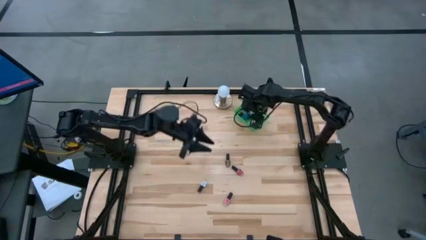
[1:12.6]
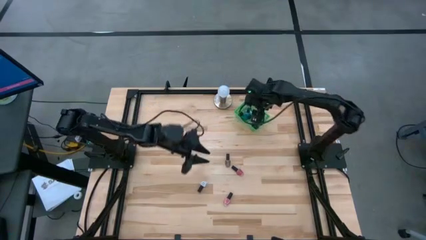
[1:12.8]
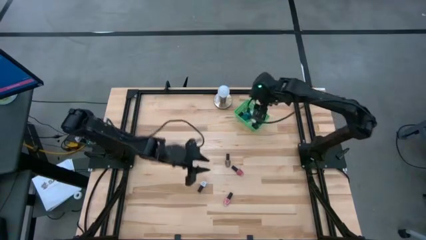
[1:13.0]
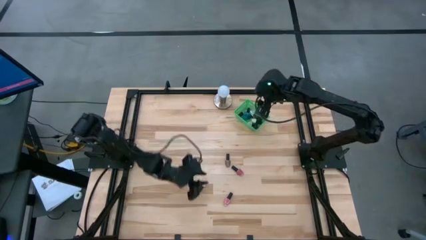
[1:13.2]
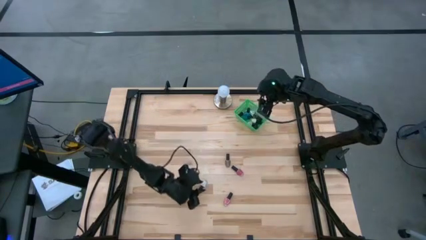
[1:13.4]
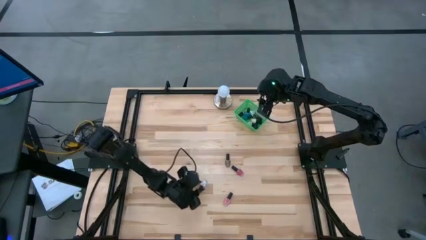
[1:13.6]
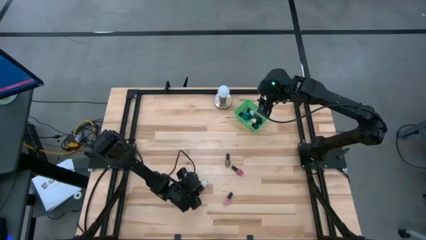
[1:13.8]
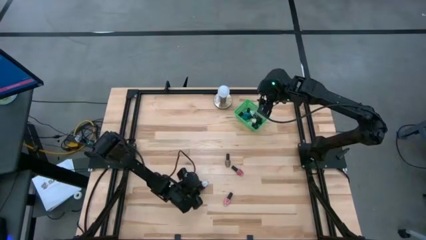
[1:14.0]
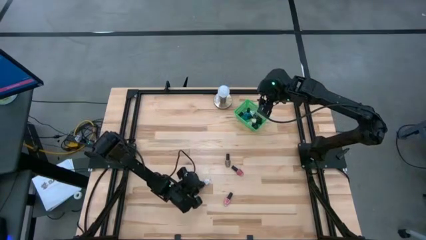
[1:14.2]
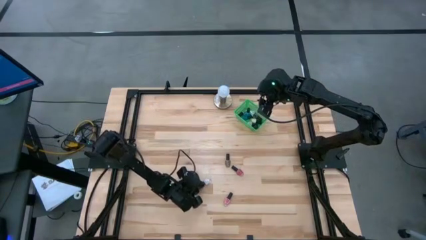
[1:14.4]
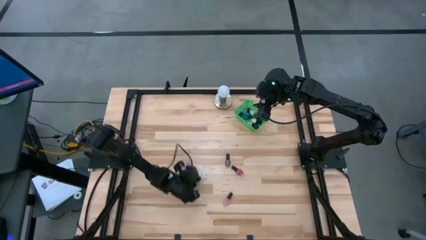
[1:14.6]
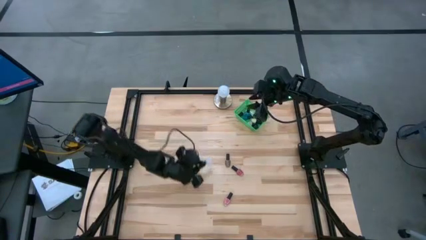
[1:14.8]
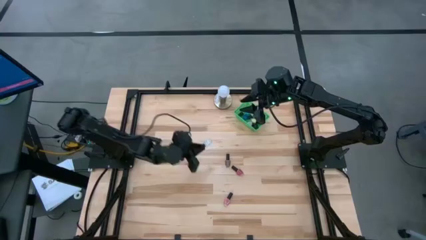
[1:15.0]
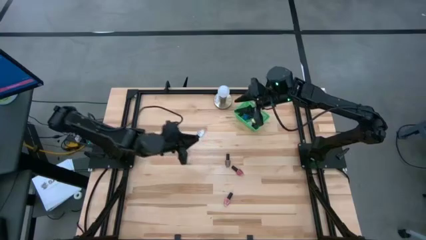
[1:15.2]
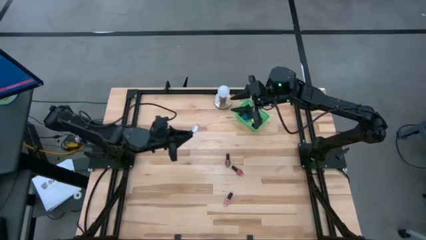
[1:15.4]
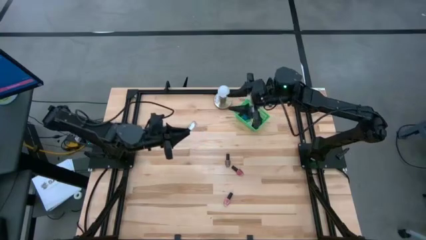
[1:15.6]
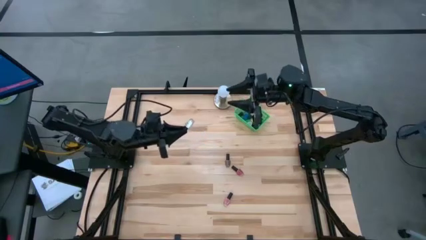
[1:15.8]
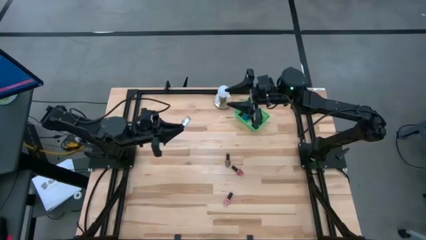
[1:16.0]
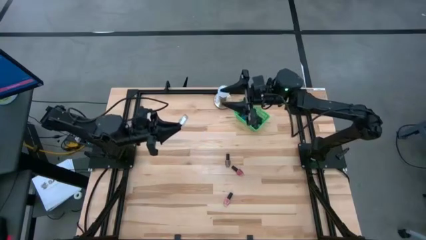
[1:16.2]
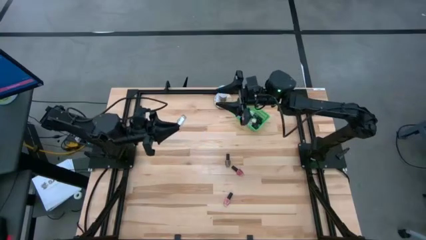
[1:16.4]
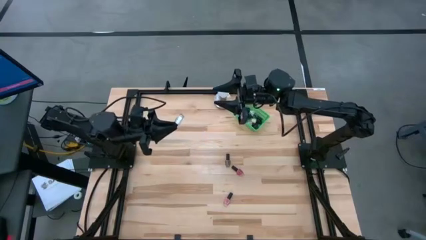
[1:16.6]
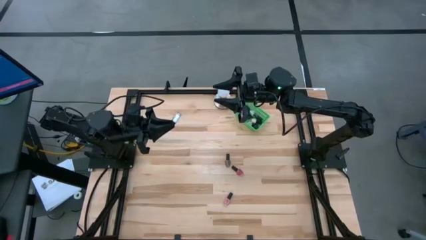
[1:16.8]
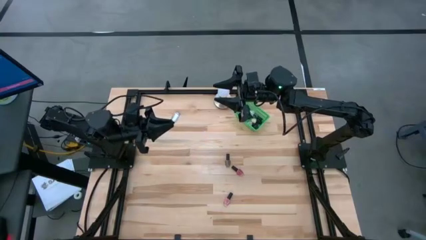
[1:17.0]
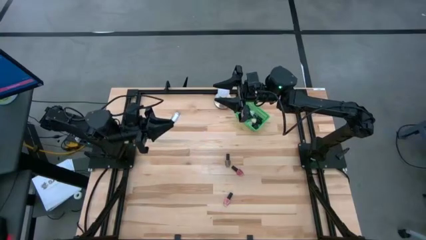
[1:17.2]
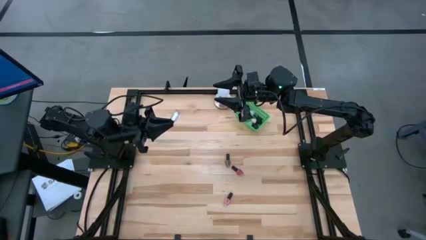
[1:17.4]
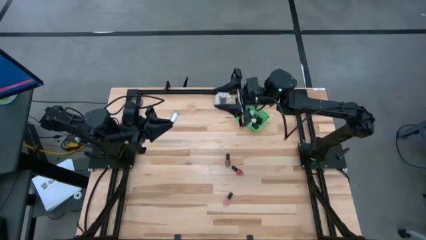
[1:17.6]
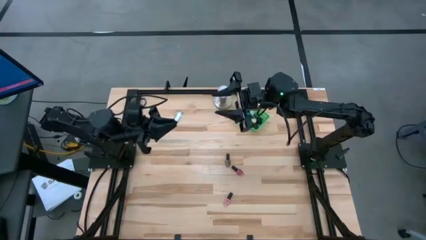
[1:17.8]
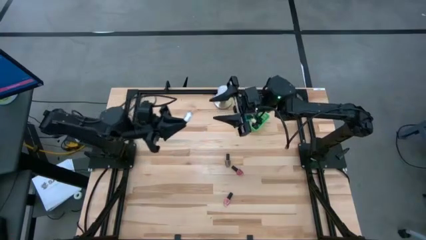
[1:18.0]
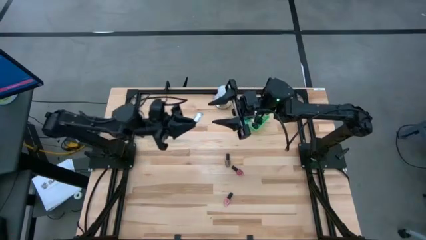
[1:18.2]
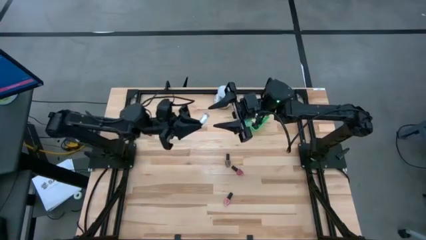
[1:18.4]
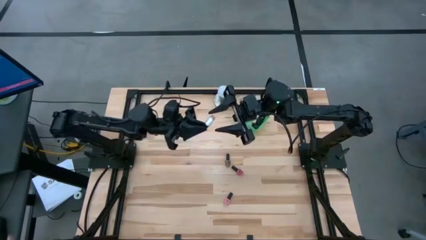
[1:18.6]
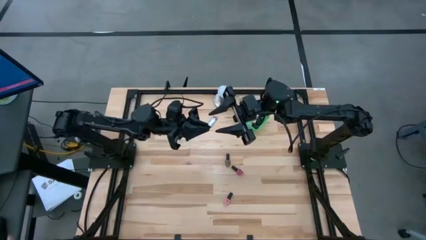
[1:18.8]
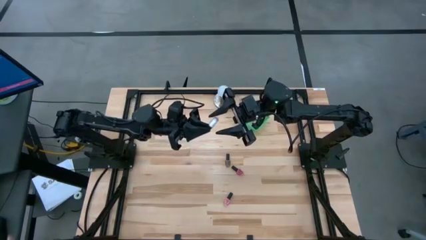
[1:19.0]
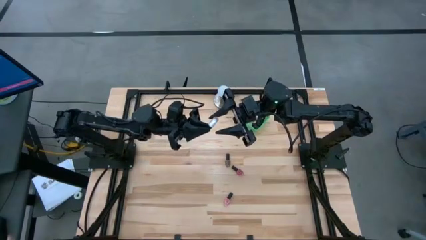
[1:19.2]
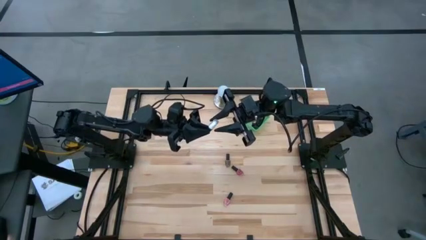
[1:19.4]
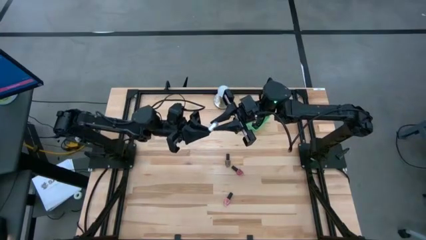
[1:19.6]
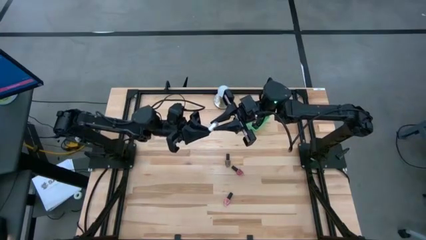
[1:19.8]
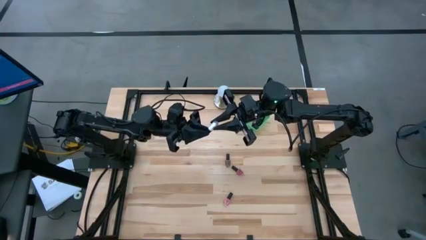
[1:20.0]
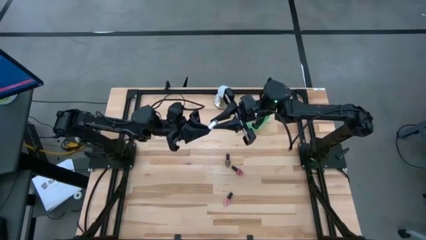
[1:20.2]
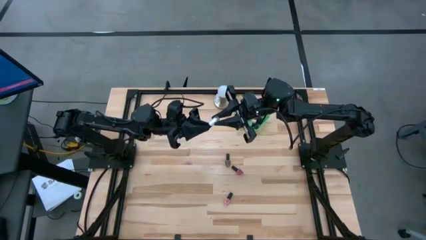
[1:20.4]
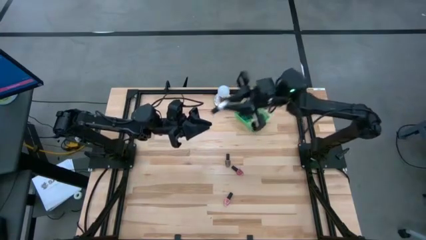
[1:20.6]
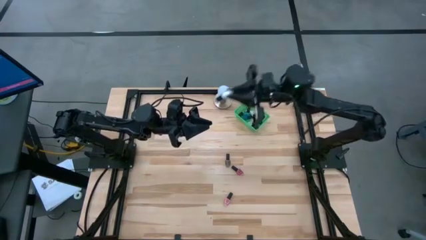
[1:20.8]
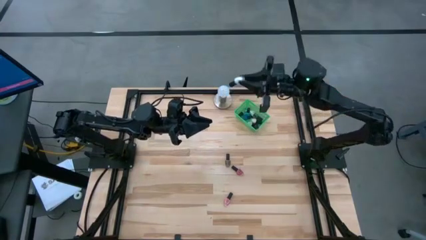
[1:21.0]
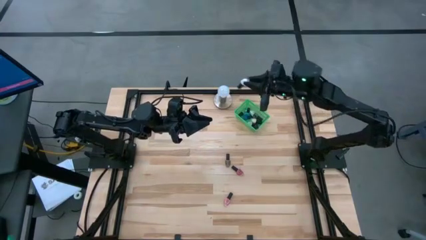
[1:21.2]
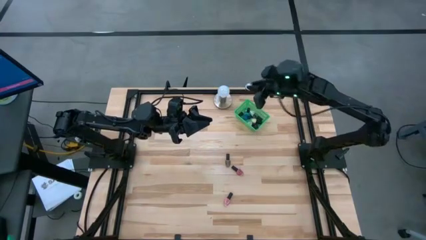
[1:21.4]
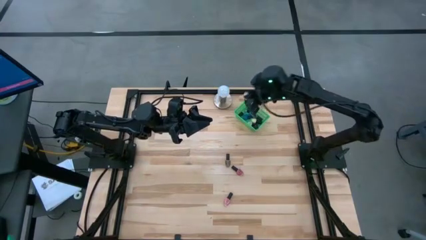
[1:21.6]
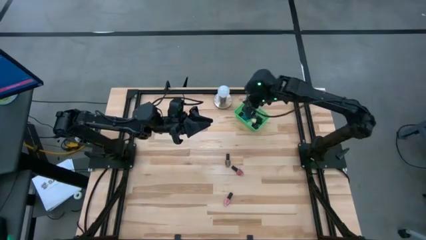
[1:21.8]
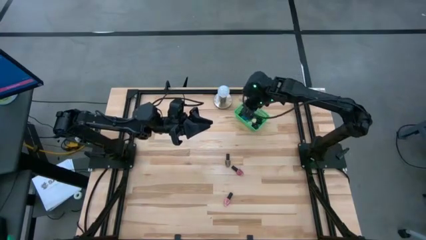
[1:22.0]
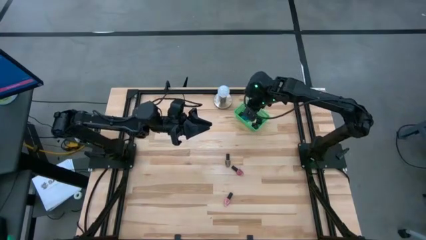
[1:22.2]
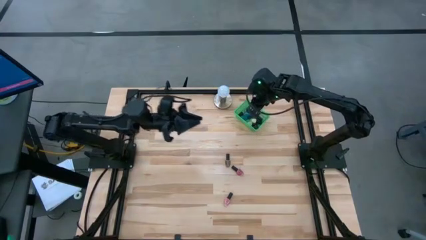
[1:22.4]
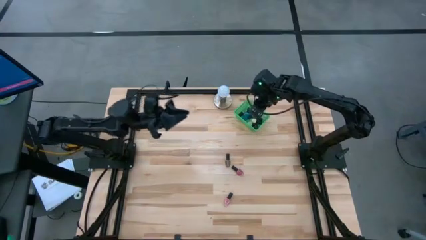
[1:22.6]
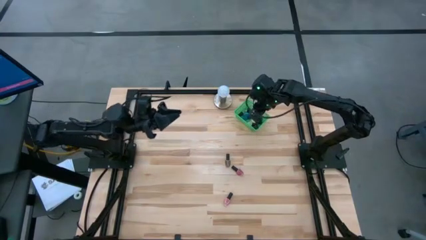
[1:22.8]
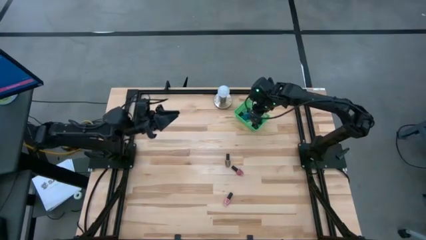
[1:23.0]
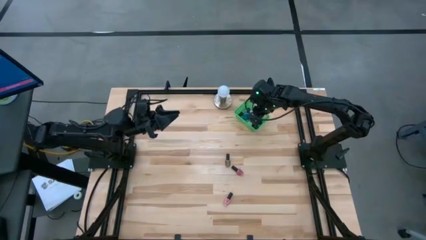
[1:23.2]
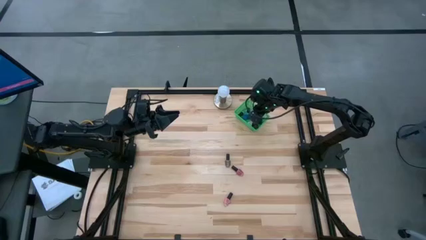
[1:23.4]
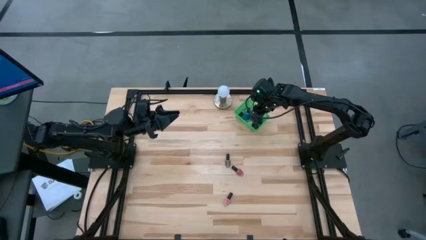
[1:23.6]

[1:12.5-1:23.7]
Task: Pick & Place Nail Polish
Put the white nail polish bottle into the green bin

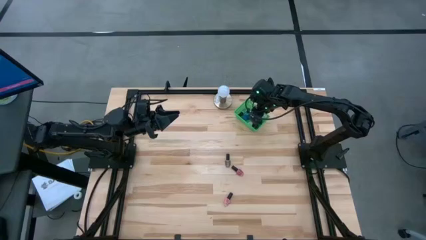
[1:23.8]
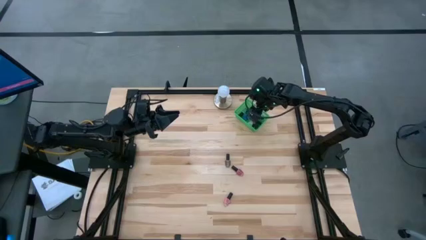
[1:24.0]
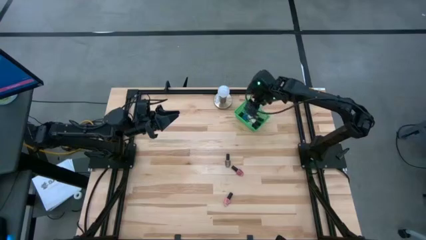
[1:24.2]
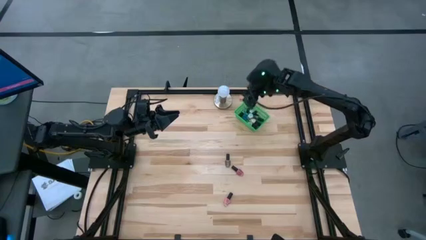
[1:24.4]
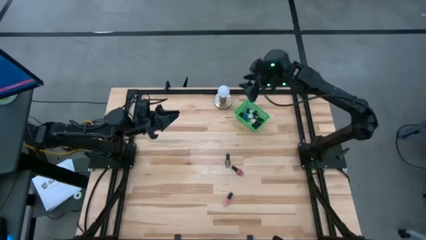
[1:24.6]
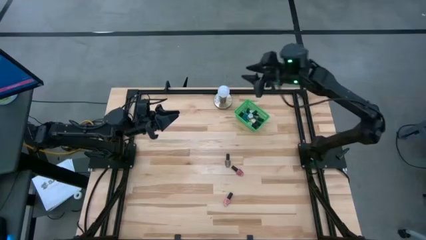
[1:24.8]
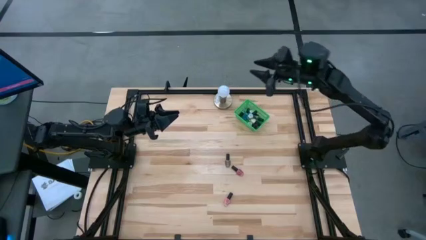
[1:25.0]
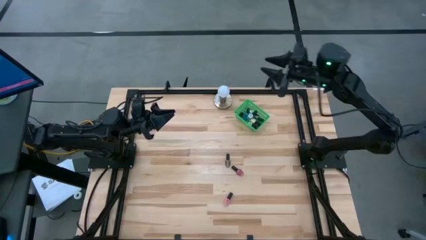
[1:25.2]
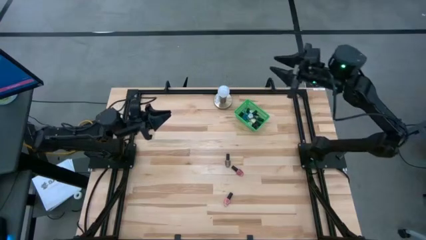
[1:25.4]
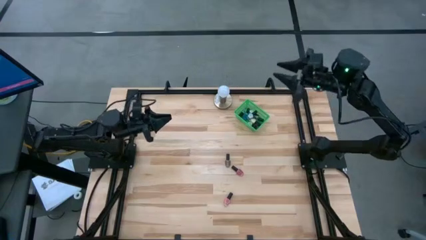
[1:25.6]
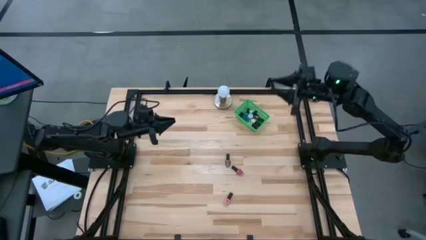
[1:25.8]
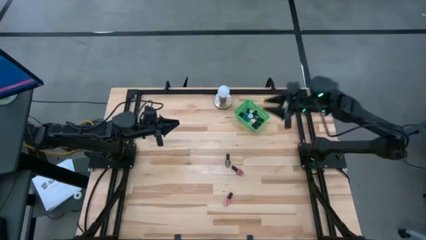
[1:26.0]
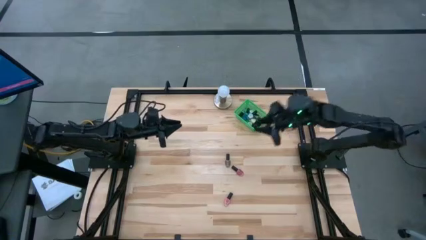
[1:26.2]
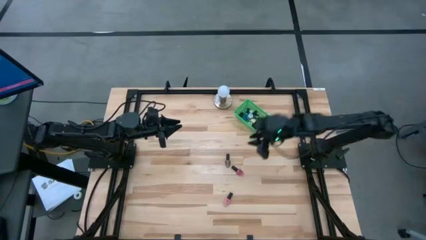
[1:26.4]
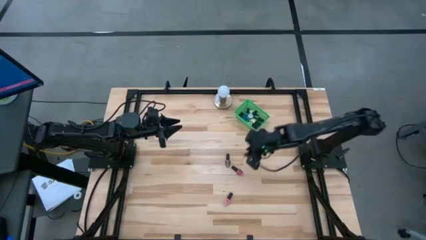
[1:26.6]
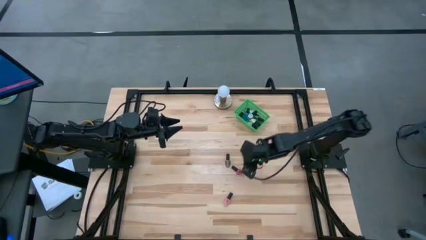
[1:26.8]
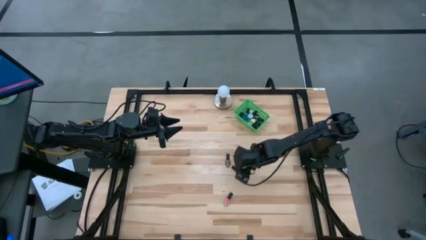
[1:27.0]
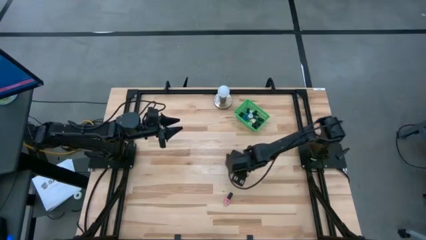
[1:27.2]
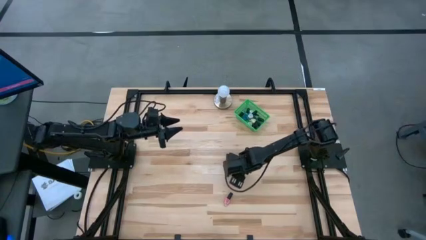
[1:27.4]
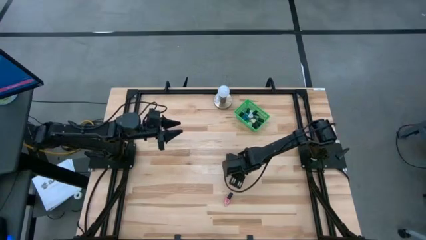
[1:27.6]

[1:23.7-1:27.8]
Put the red nail polish bottle into the green bin

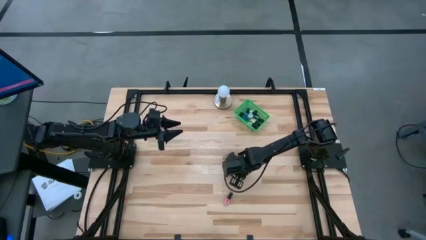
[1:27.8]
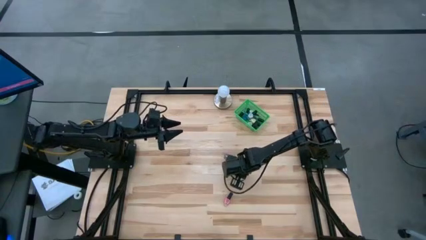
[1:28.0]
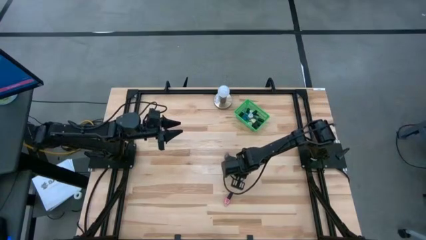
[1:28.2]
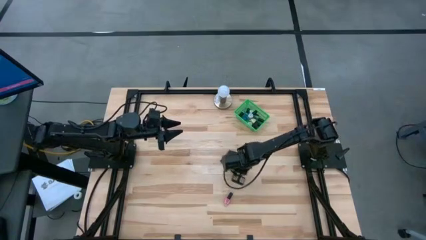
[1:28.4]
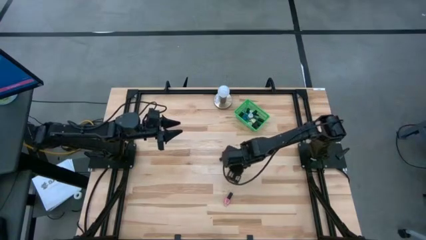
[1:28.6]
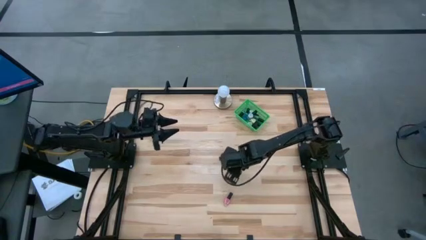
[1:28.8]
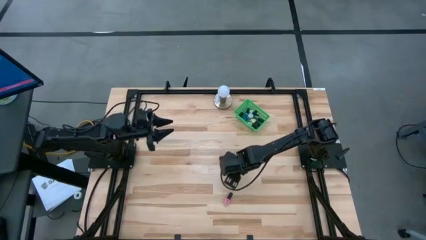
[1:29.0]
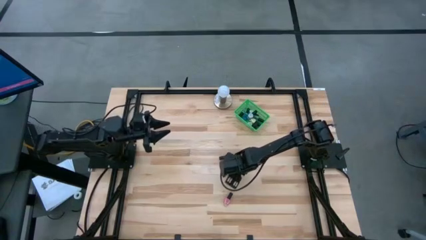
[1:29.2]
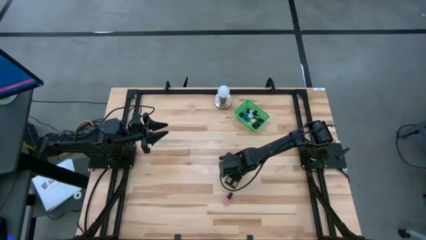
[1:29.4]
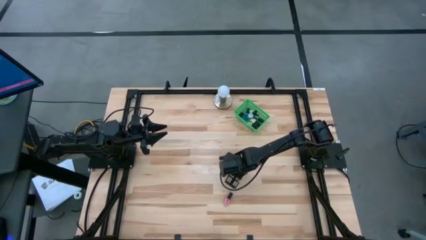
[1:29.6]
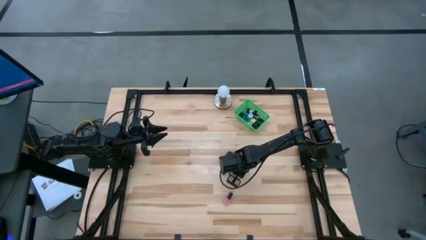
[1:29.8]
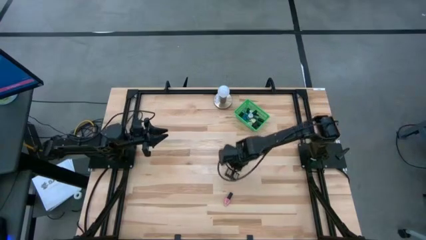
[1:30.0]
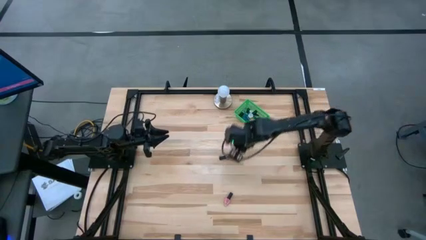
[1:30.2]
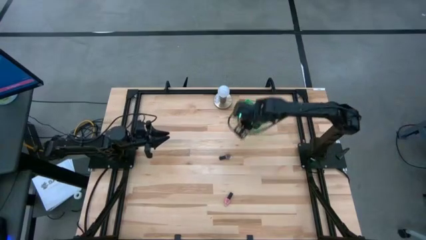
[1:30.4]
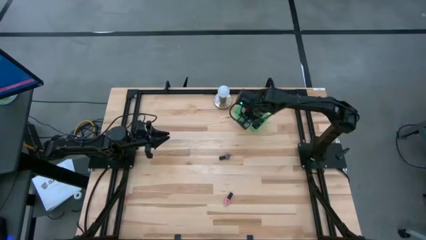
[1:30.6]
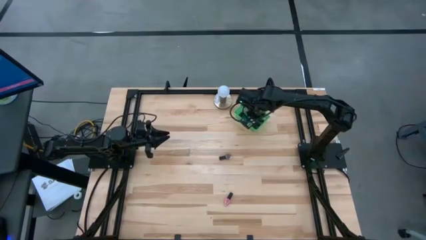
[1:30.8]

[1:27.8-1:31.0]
Put the red nail polish bottle into the green bin
